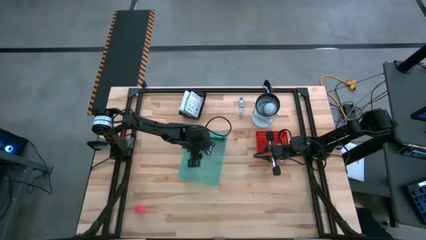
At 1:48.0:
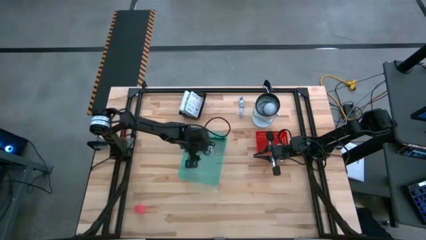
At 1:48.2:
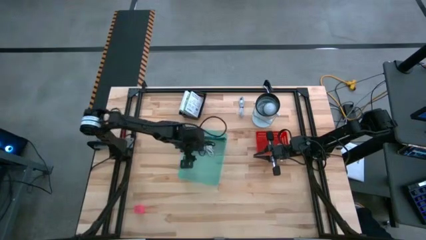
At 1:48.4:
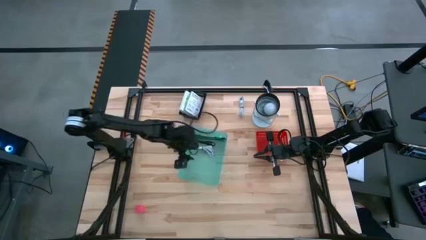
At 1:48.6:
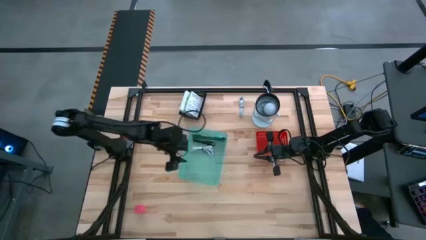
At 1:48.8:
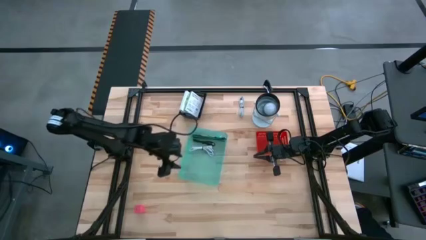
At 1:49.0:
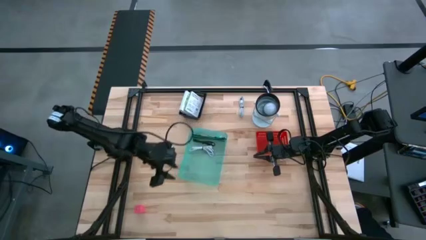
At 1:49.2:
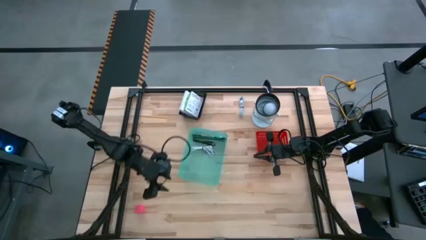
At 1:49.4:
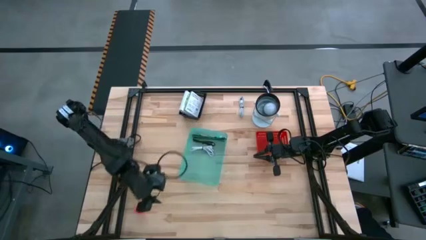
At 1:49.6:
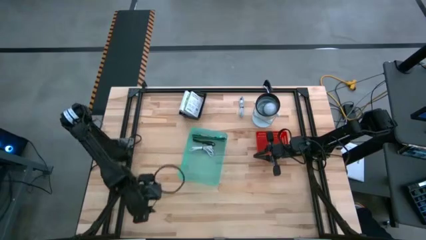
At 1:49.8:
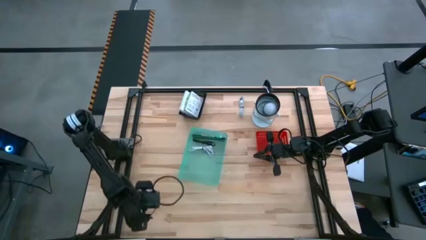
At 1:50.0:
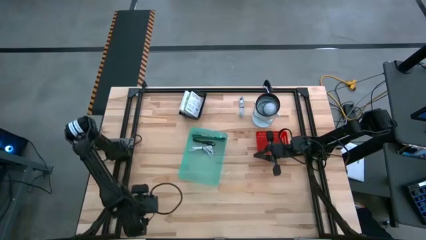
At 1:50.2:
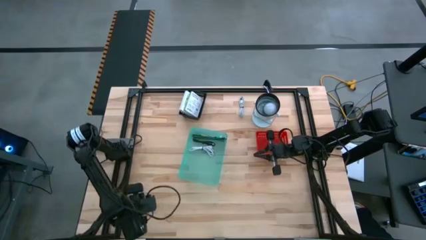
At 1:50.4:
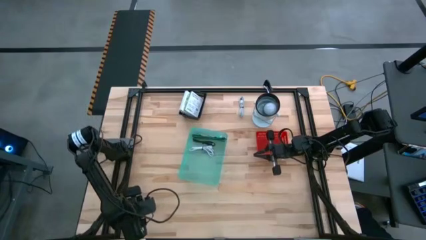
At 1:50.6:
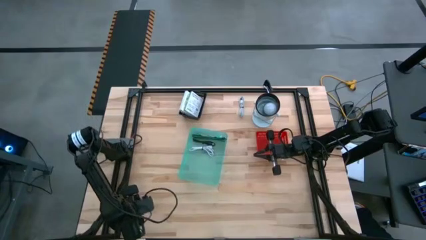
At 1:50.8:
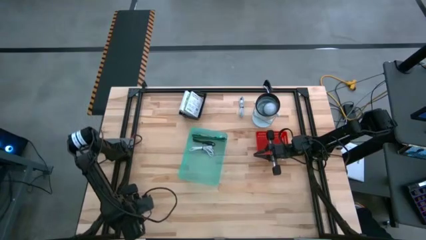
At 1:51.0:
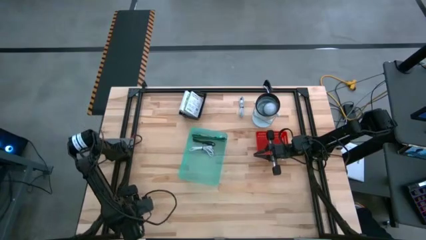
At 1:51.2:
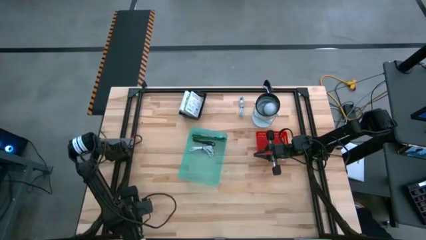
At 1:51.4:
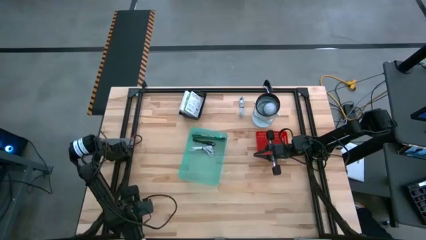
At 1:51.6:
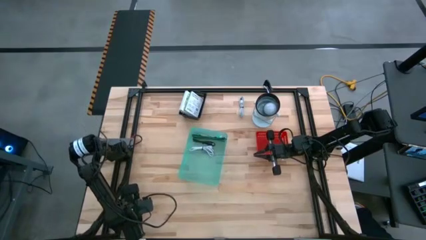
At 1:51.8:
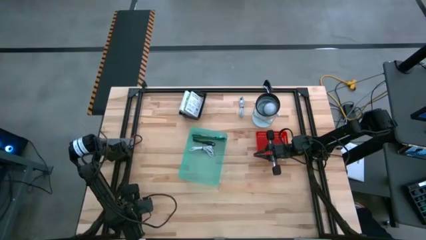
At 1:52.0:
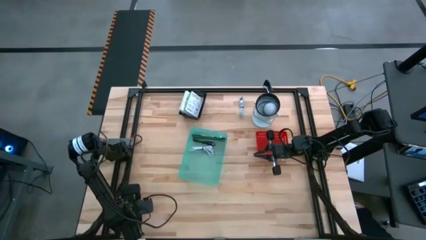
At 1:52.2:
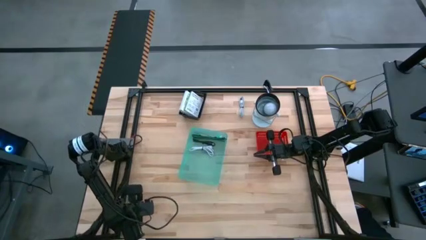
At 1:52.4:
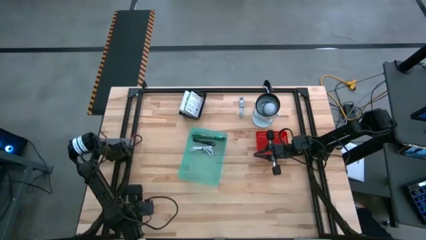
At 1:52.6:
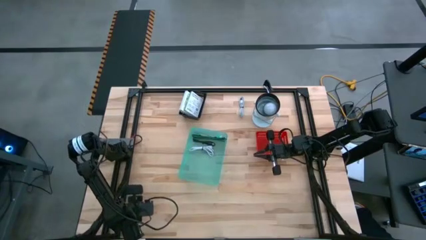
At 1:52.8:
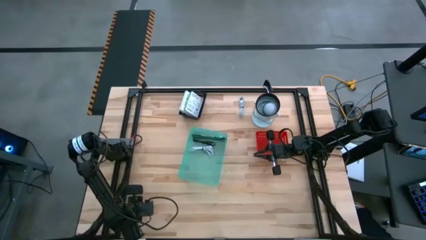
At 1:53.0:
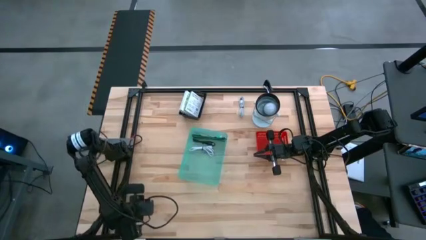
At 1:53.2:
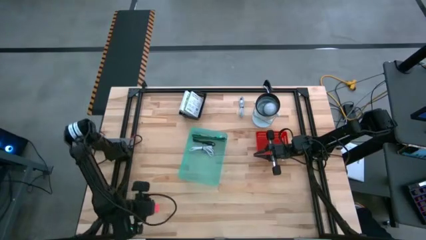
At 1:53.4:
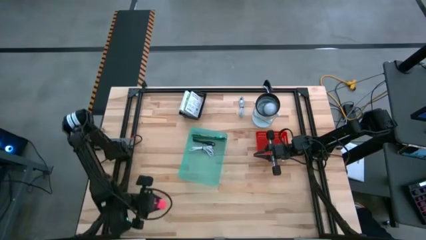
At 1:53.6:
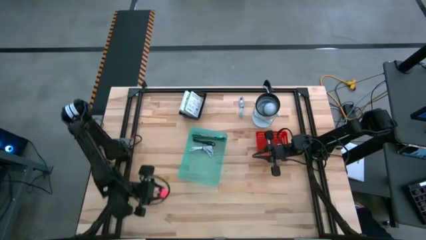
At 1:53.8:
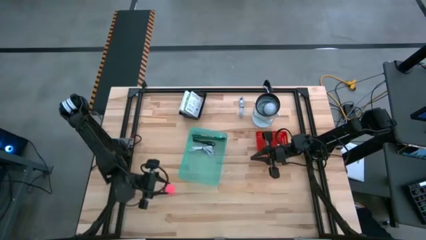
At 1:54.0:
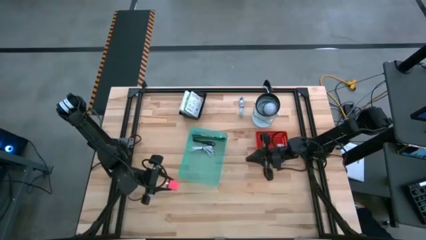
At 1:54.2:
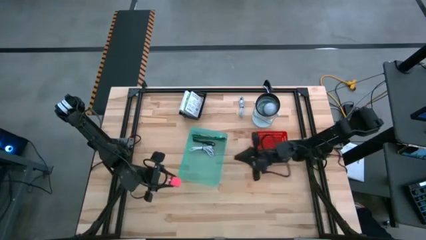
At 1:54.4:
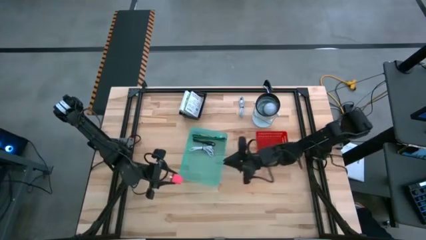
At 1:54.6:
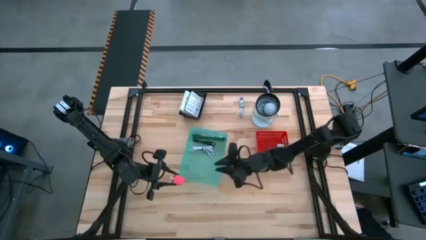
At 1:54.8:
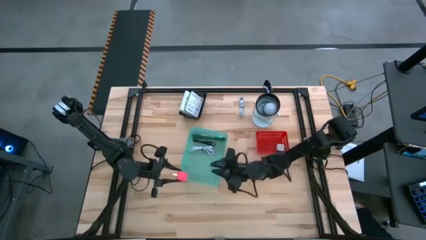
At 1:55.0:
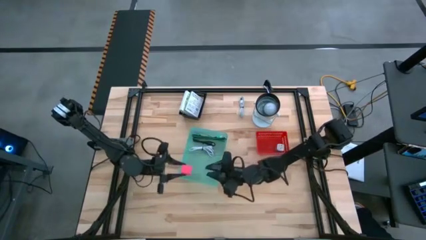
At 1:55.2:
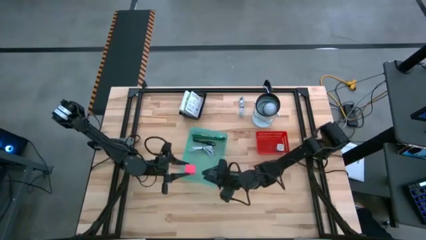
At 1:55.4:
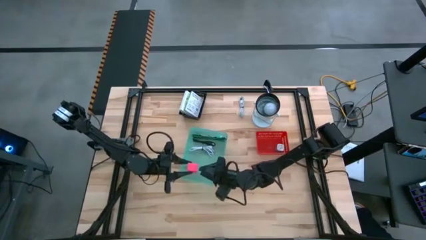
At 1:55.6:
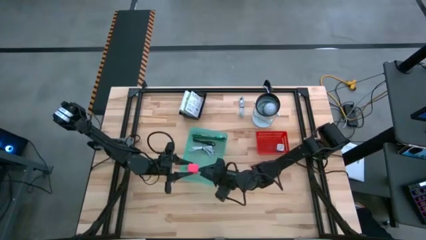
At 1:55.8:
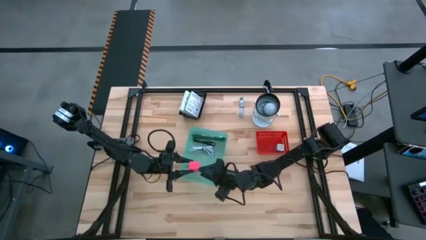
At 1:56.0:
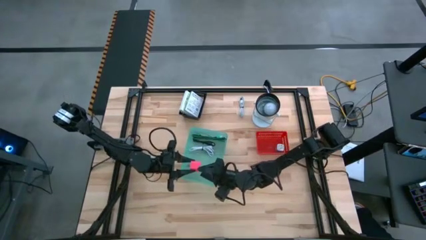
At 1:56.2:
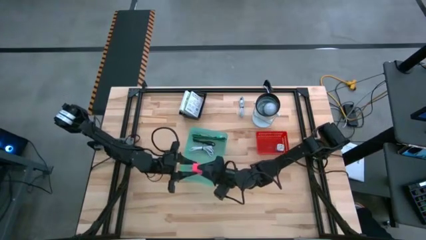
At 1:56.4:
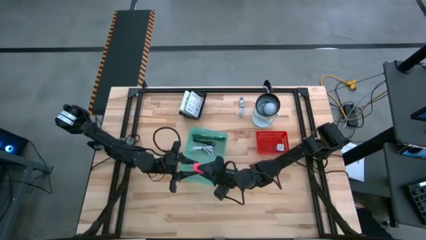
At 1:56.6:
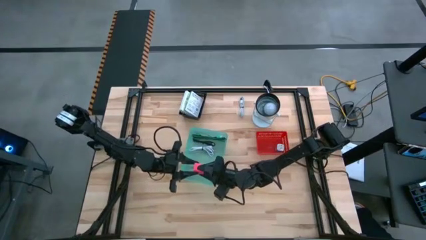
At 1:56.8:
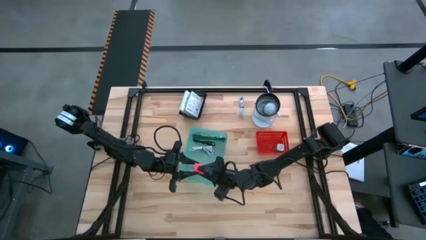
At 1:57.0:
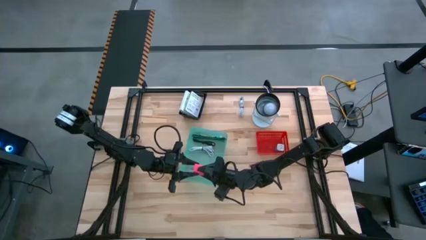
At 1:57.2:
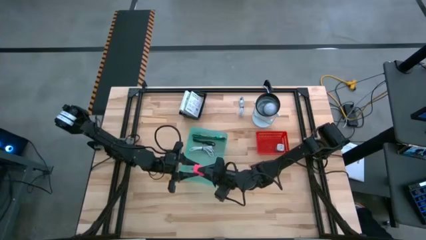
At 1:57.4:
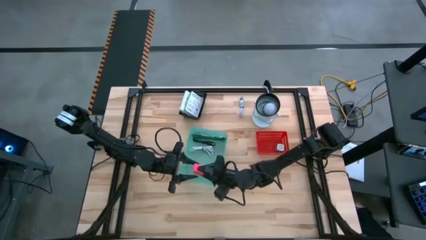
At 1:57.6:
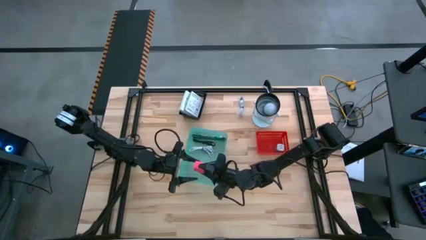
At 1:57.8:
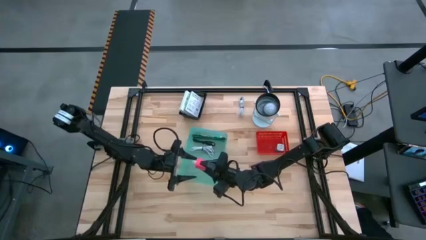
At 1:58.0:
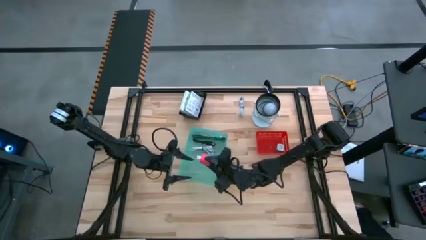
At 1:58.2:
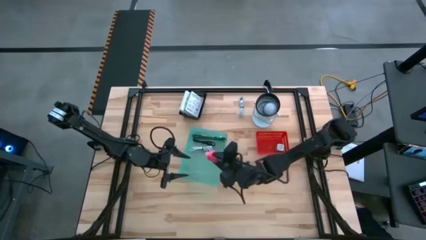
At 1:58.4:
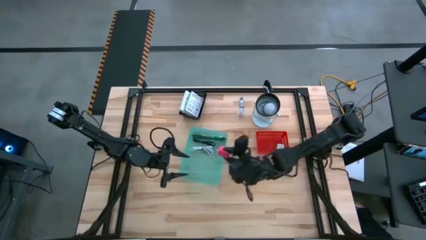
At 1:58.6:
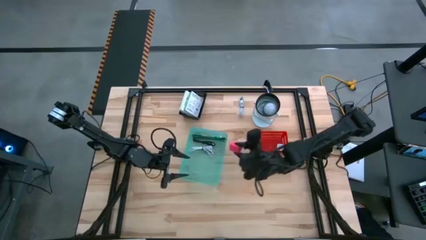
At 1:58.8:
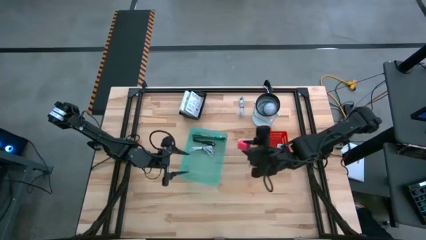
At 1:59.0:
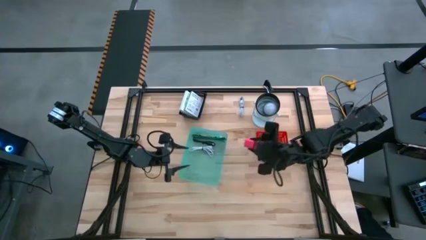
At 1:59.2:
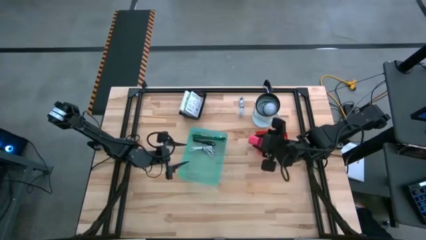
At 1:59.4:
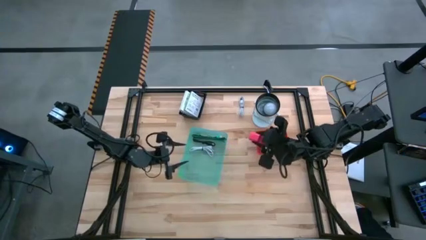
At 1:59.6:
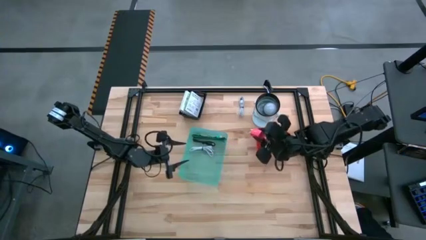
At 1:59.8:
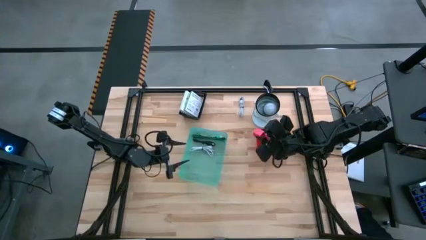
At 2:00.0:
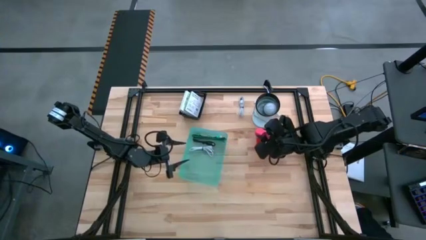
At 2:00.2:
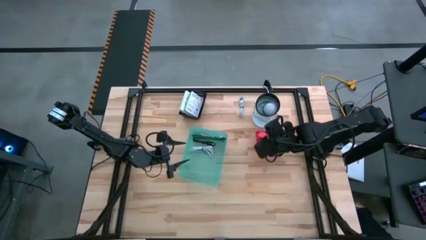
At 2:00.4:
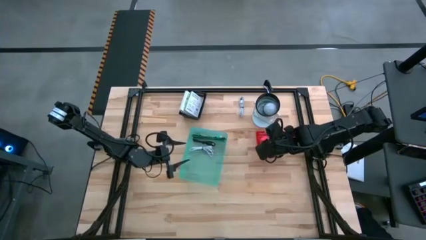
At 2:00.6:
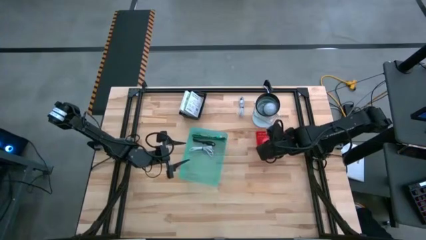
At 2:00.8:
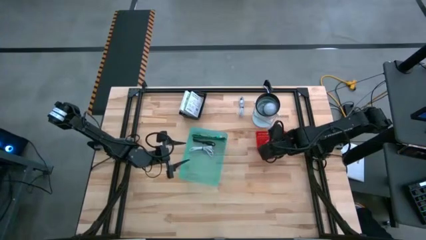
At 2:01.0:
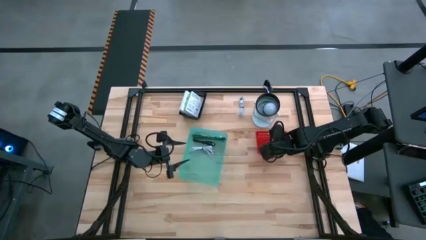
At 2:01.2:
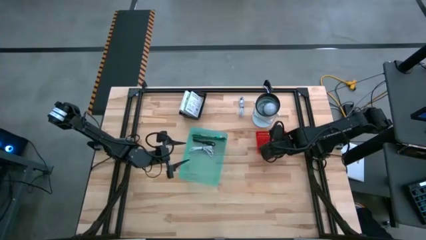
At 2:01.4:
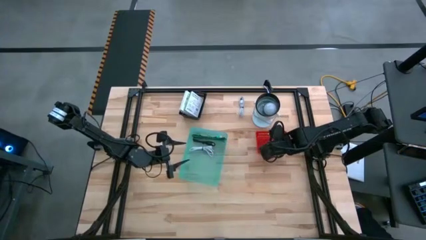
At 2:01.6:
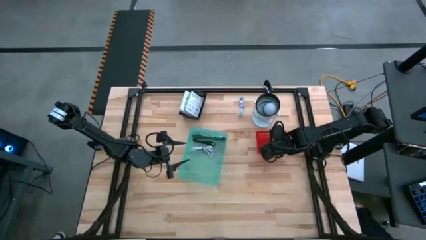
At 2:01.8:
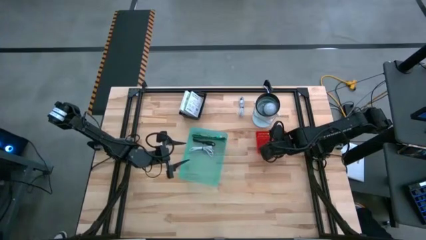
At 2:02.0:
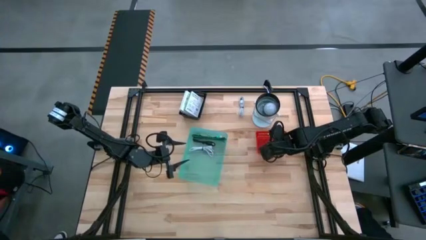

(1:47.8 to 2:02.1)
Task: Pick and place items into bin
Put the pink charger adapter into the red basket
